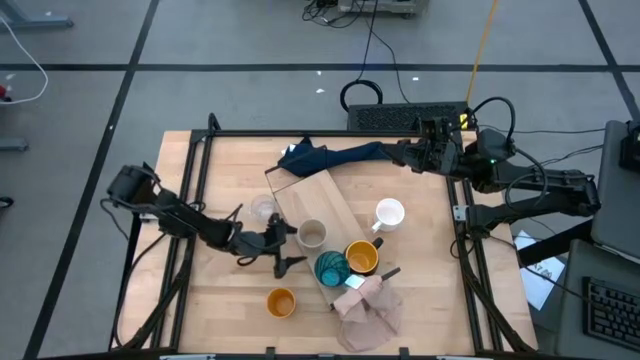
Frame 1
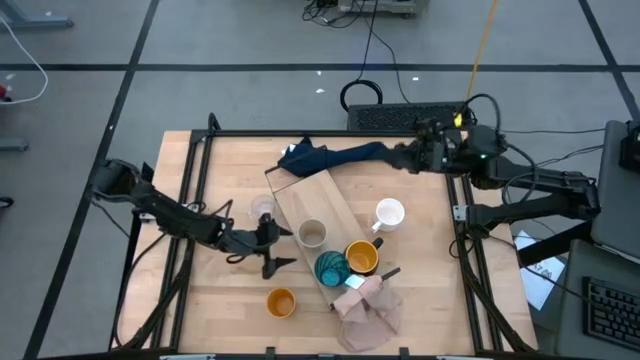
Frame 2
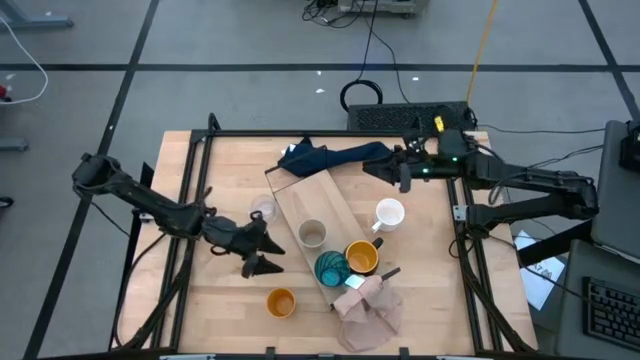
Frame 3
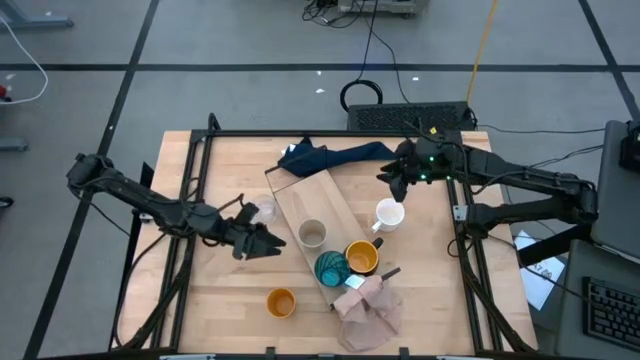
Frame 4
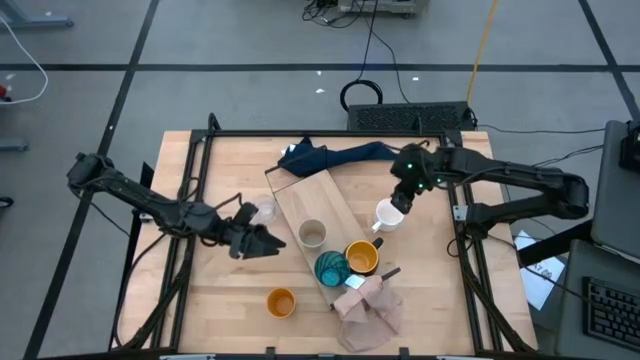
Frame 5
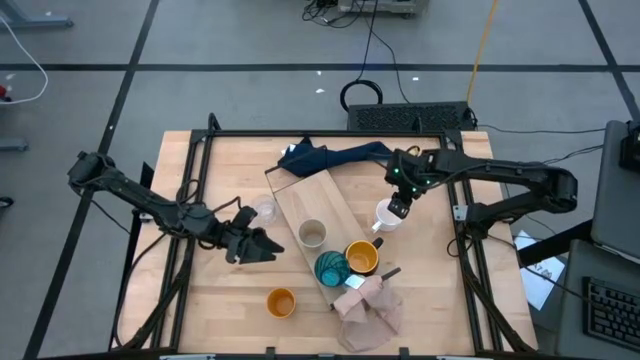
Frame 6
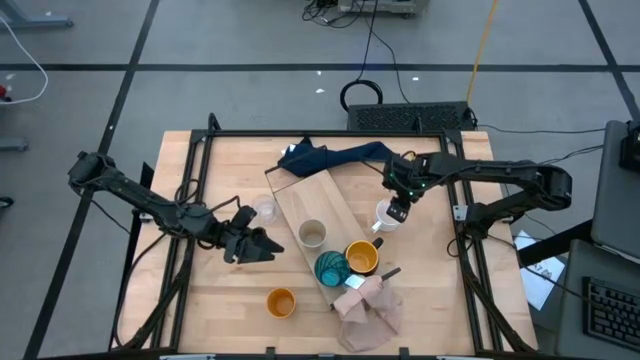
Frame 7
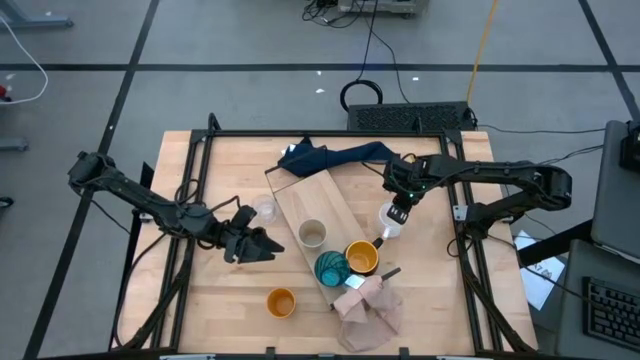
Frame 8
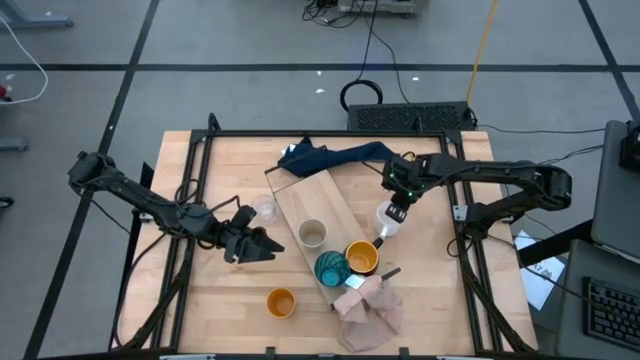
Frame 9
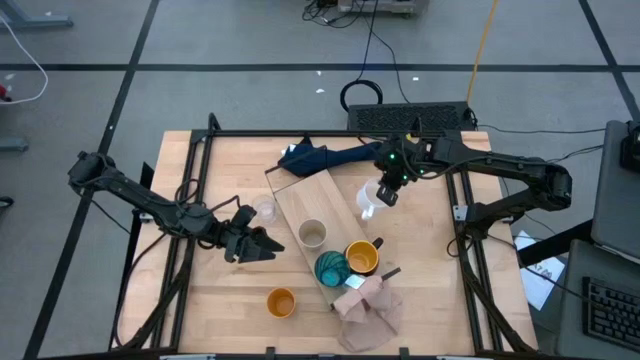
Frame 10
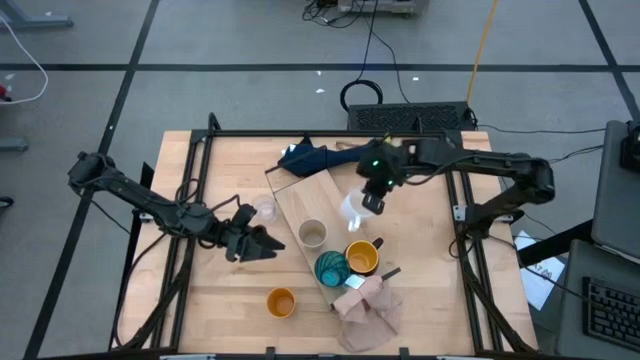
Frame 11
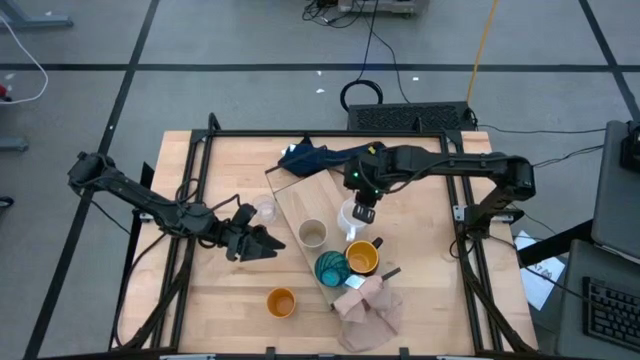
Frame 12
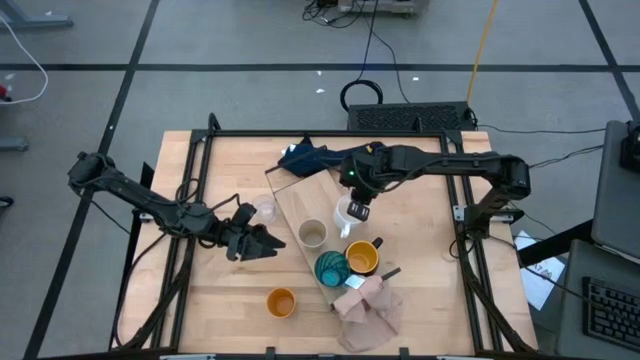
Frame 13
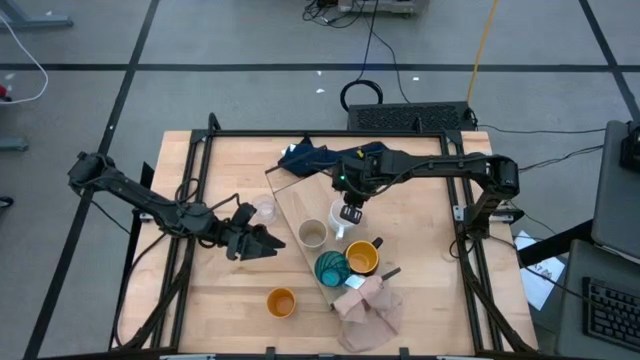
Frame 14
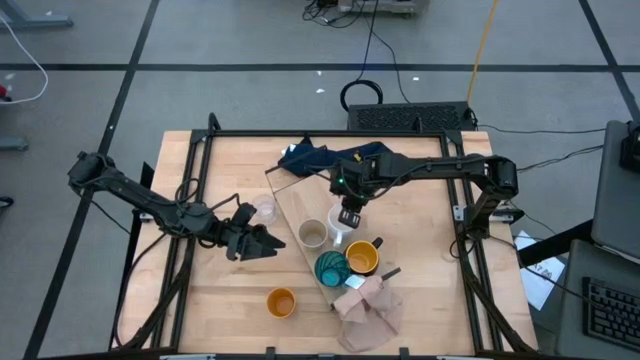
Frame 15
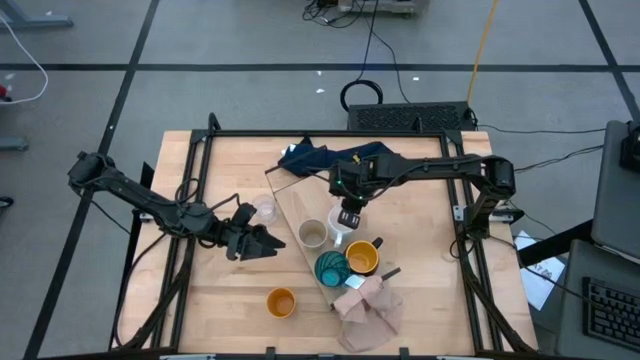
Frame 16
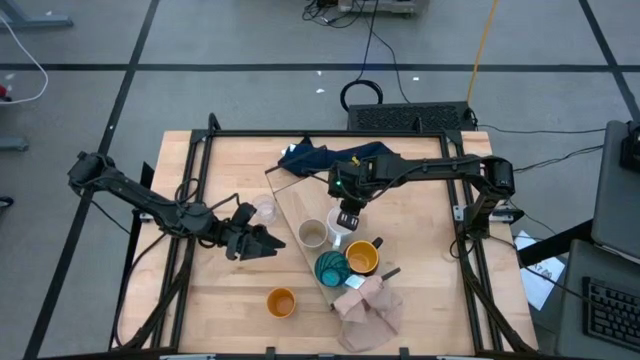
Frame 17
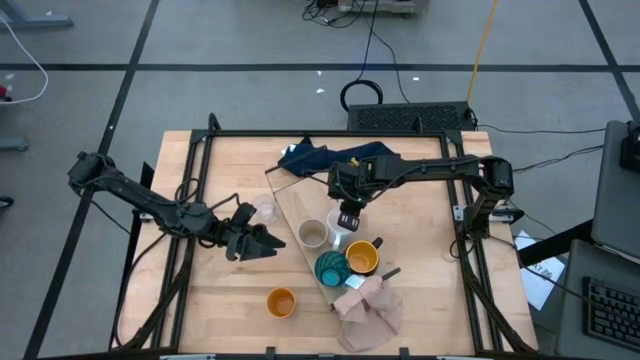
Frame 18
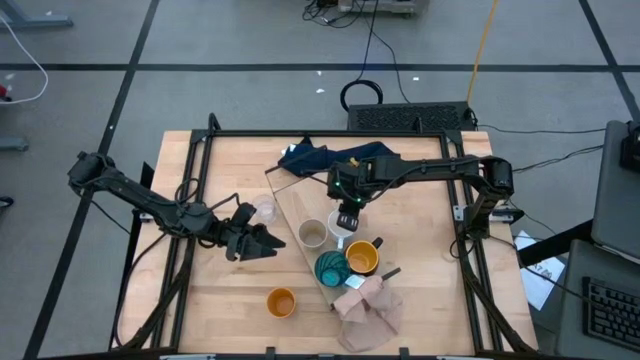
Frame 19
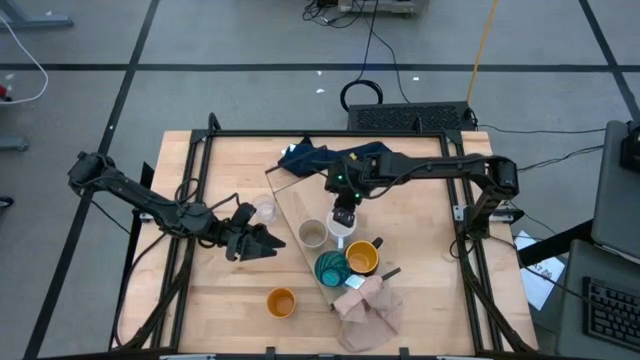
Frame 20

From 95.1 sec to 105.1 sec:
Task: Stack small to large cups/mugs on shelf
Put the white mug on the shelf
